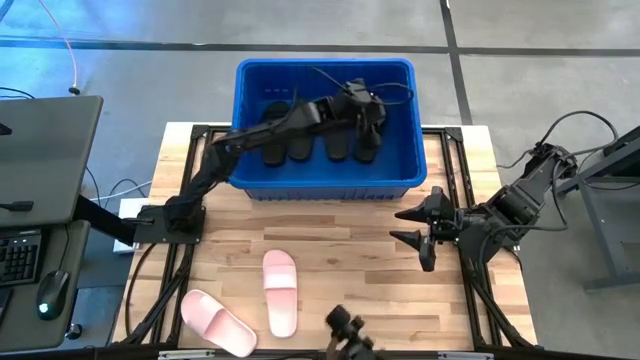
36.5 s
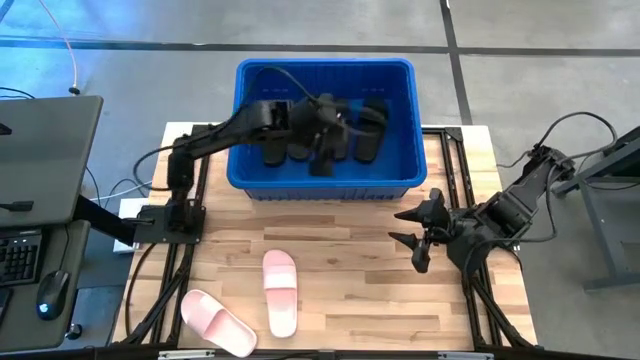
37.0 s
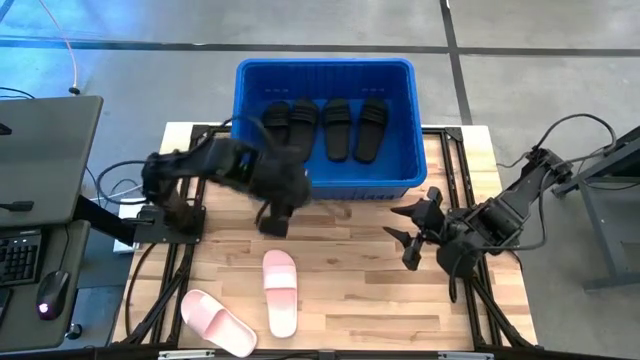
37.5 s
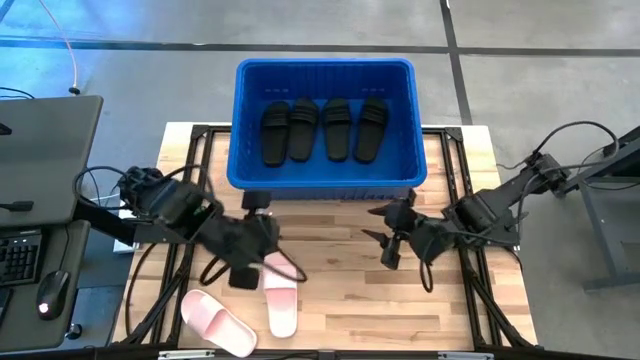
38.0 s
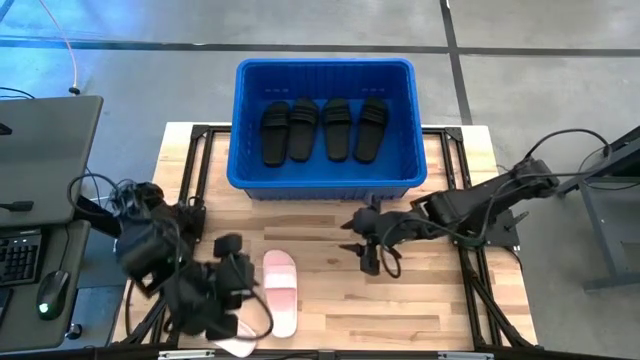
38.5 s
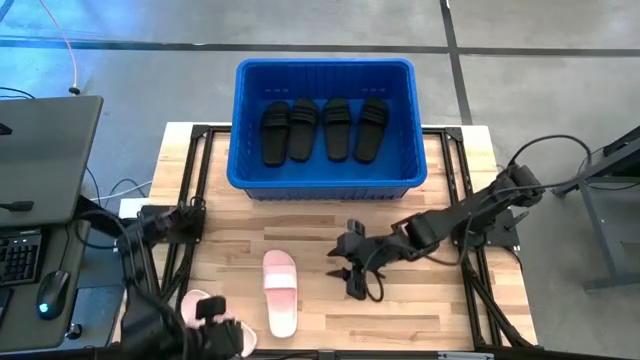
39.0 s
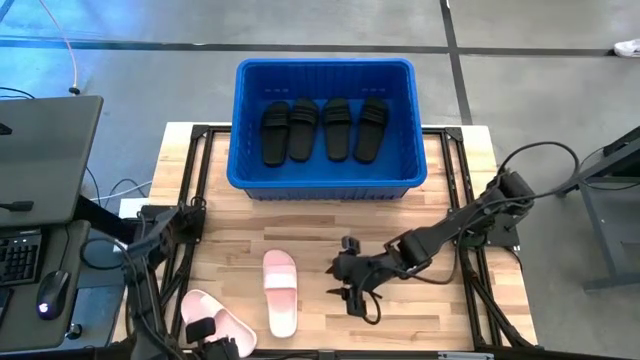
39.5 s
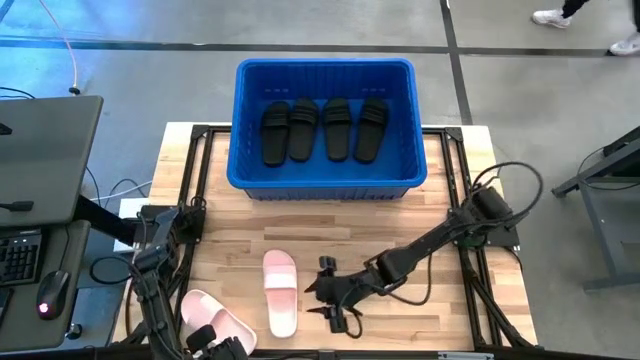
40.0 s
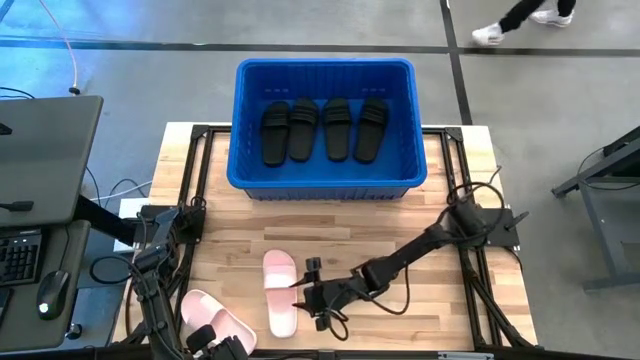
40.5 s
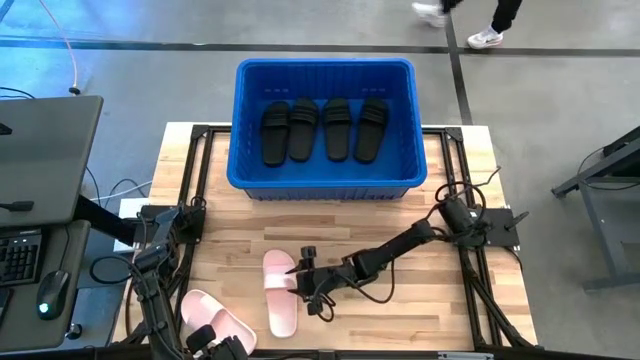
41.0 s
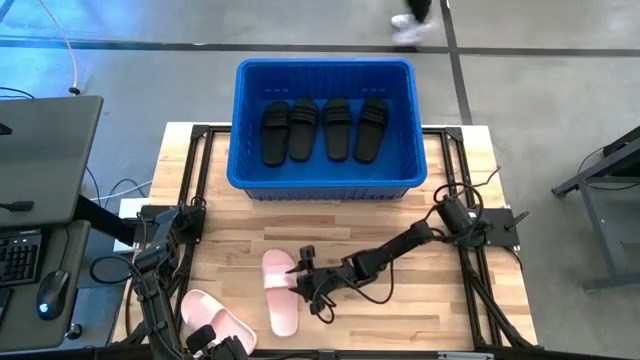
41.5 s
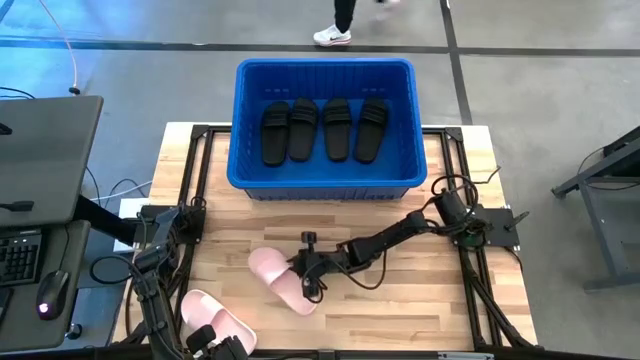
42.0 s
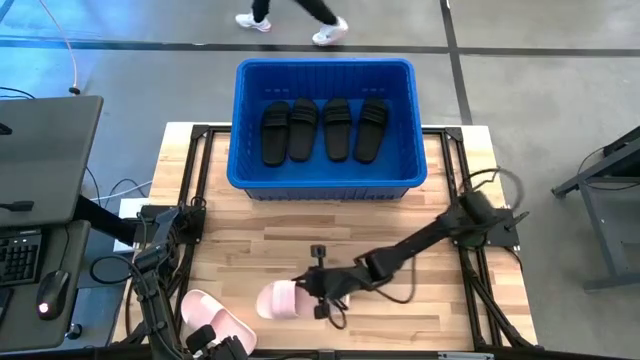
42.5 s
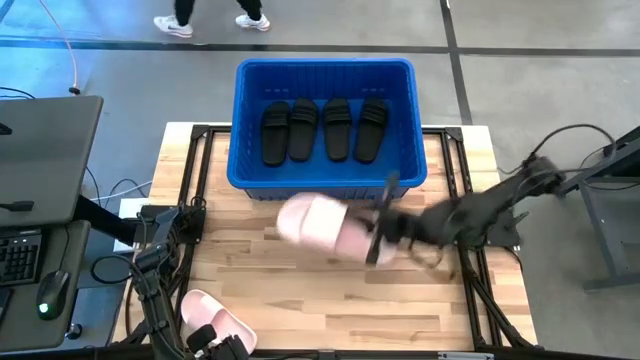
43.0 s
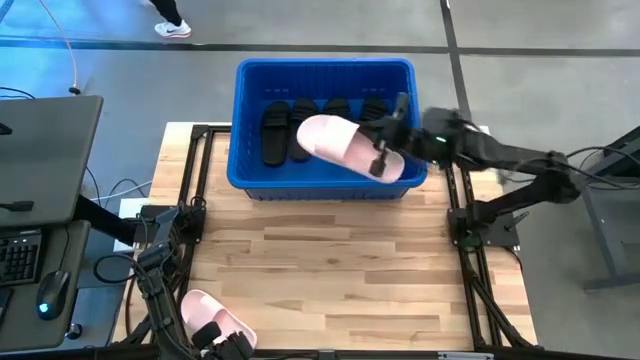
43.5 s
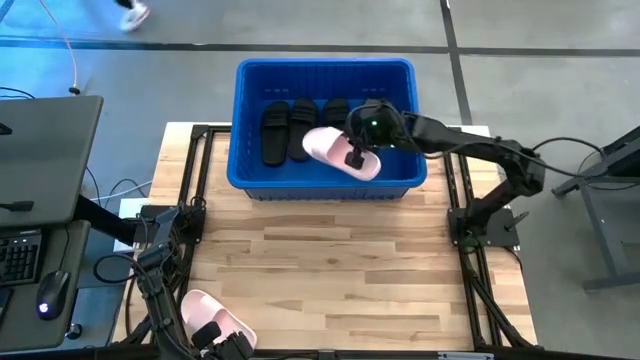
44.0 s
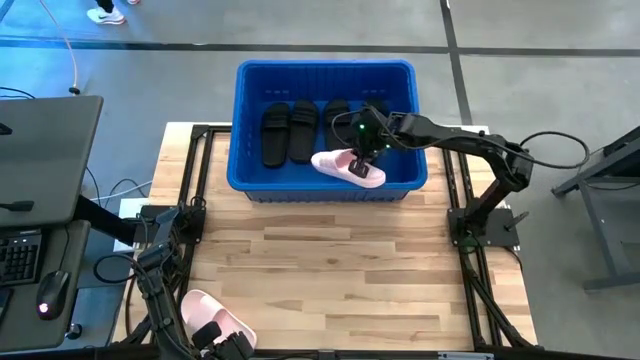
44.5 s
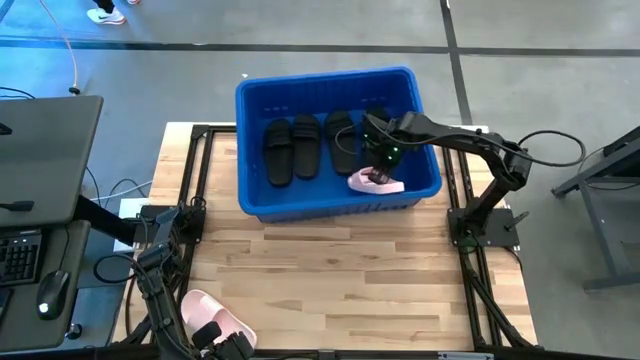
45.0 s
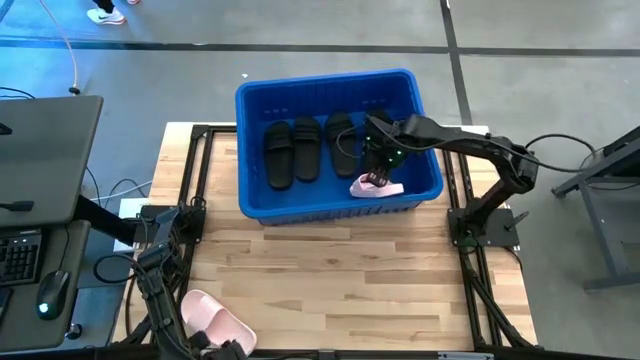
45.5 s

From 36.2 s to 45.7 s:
Task: Pick and place slides into bin
Put the pink slide into the blue bin

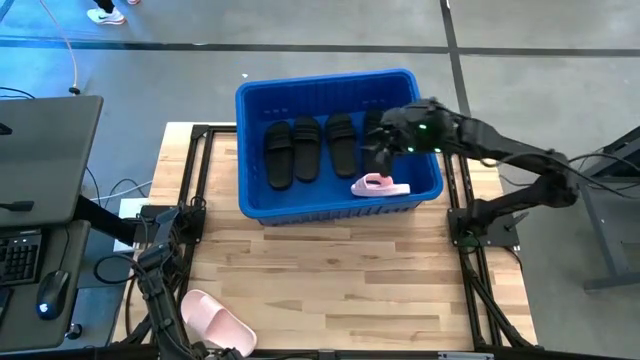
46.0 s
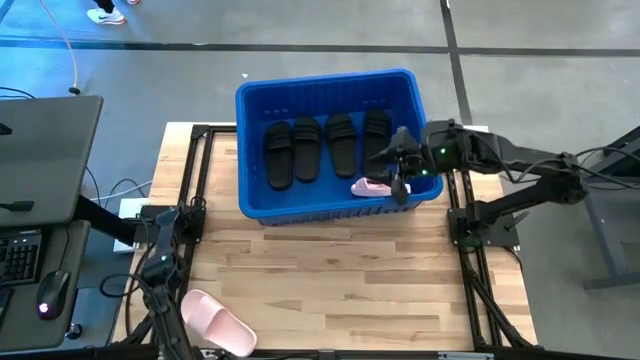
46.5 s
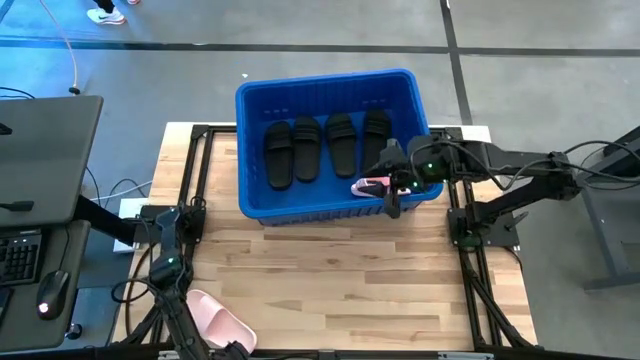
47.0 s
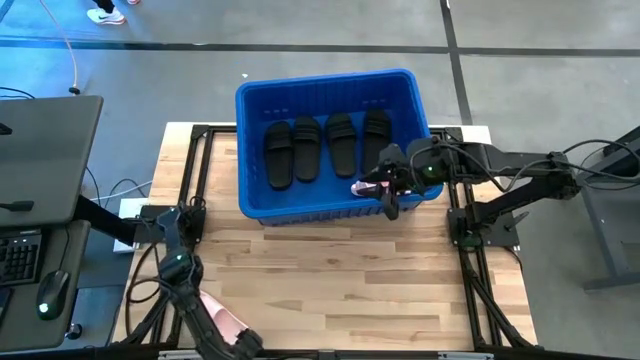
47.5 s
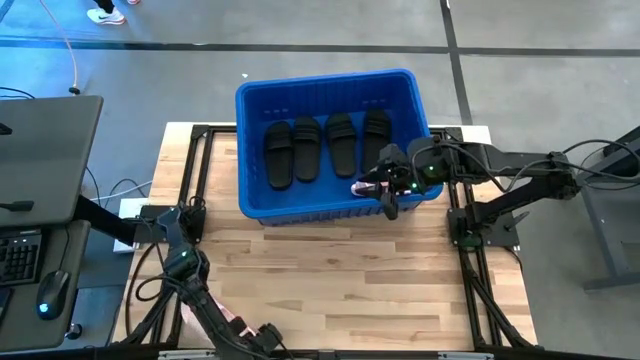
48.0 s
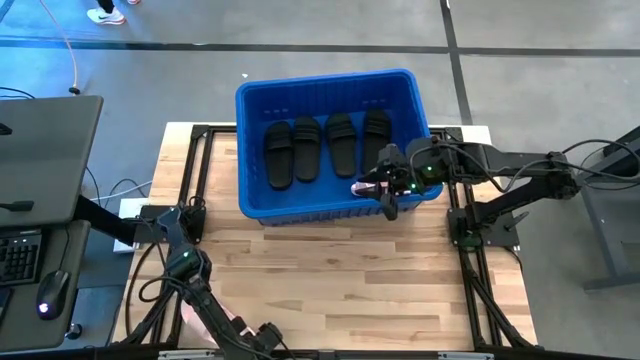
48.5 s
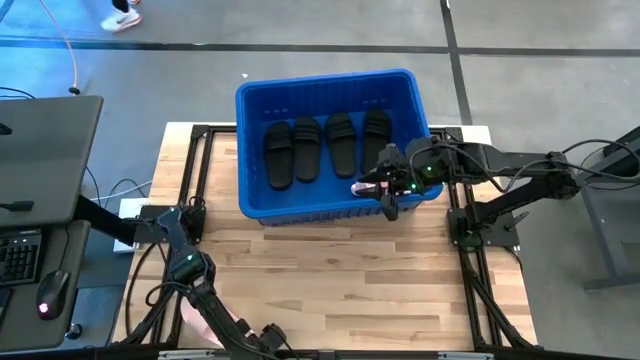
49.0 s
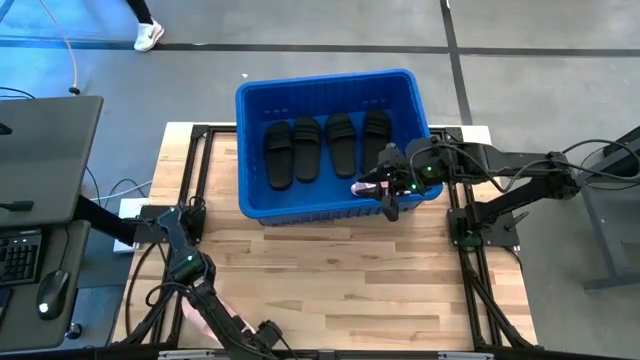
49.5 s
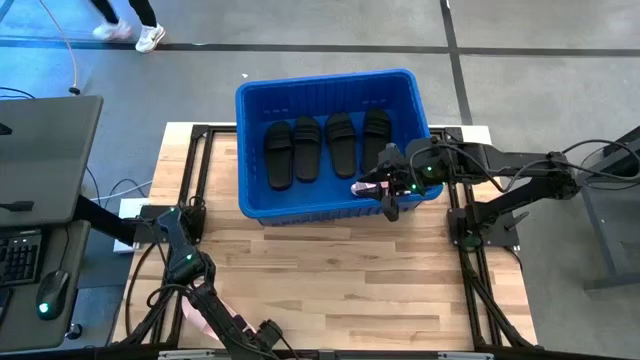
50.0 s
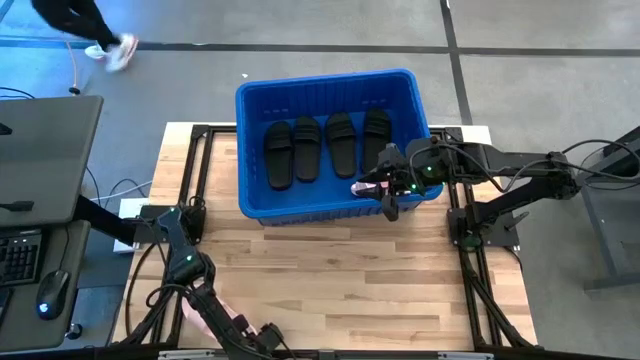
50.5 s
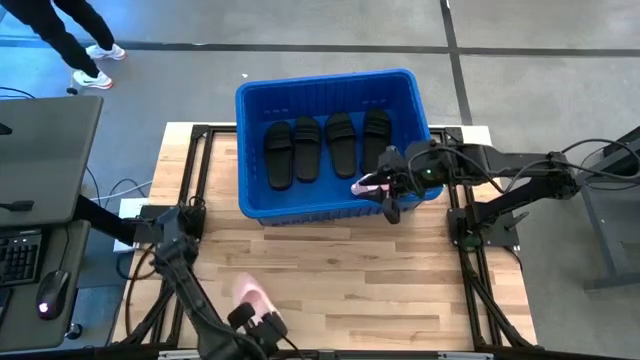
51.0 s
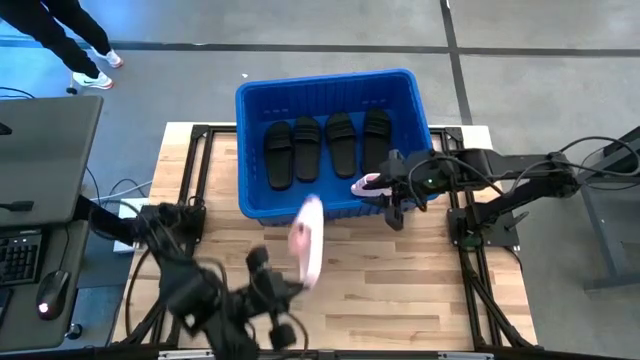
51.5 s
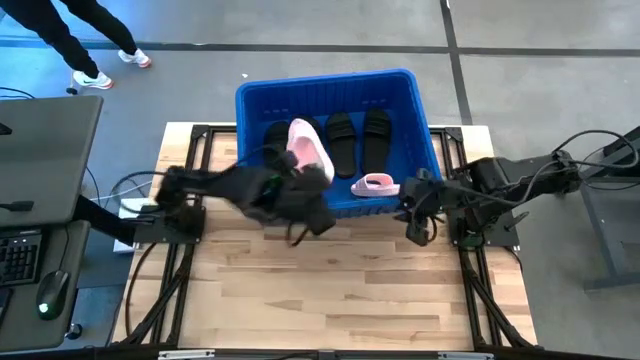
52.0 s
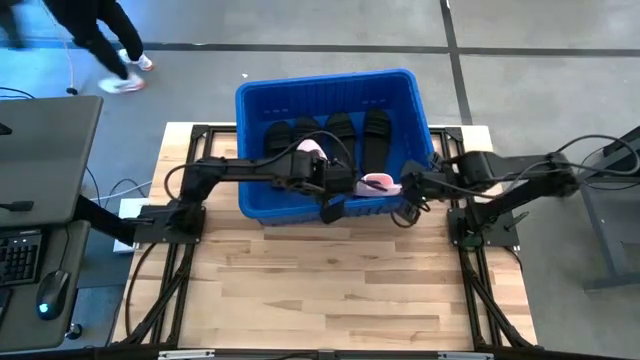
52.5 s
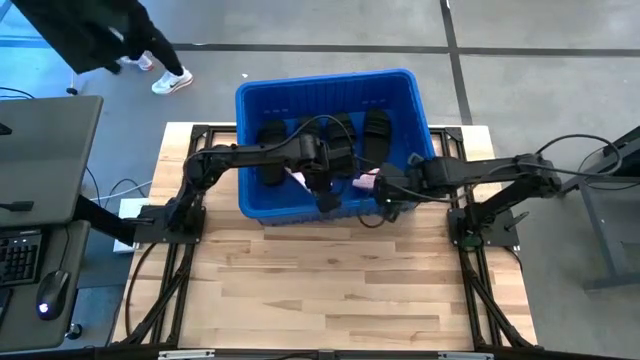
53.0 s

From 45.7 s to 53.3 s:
Put the pink slide into the blue bin

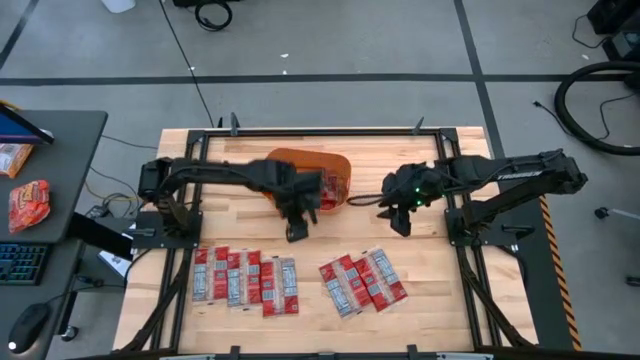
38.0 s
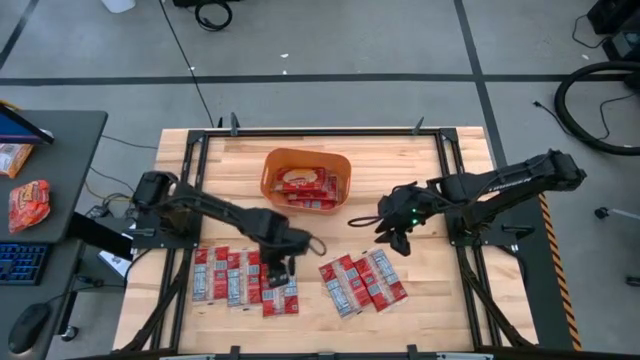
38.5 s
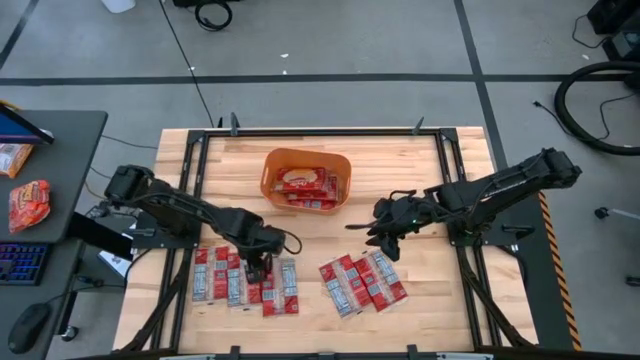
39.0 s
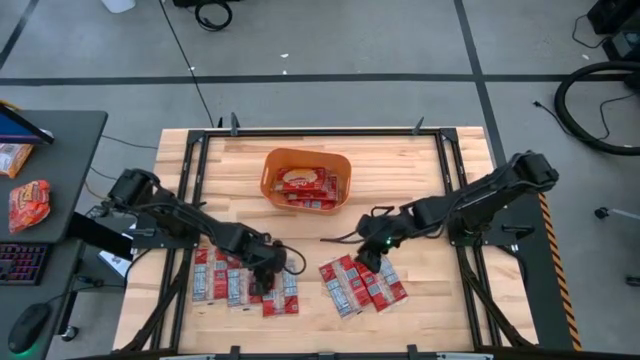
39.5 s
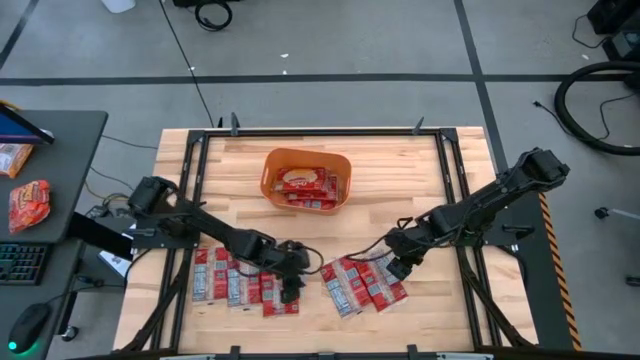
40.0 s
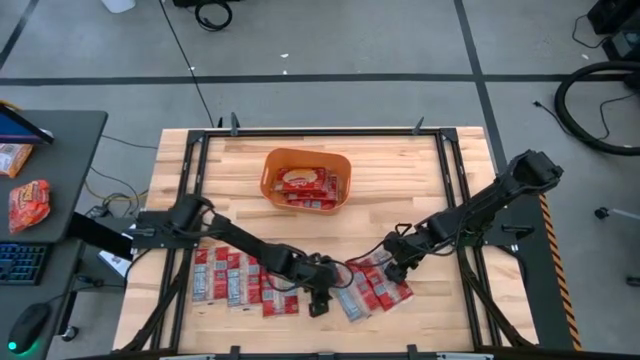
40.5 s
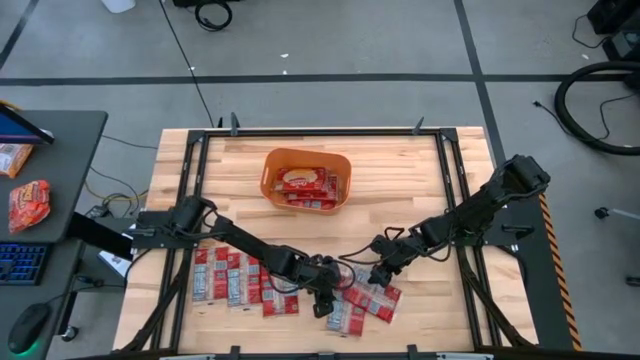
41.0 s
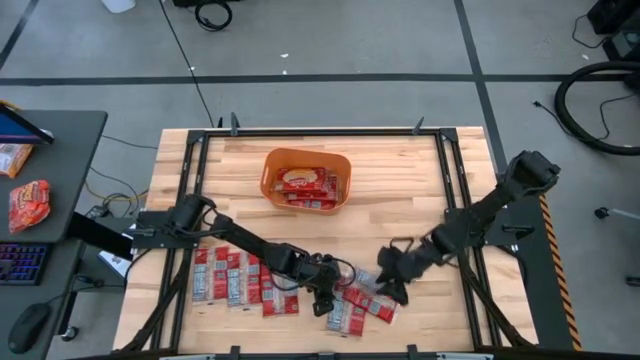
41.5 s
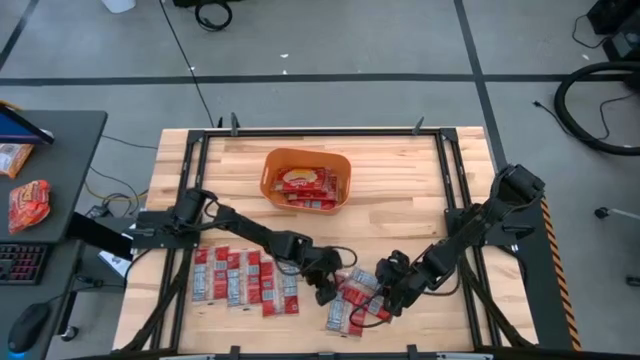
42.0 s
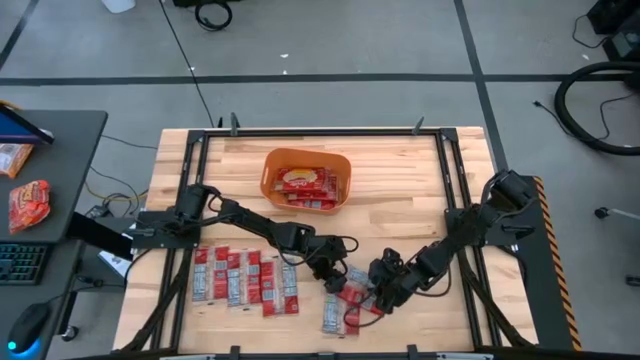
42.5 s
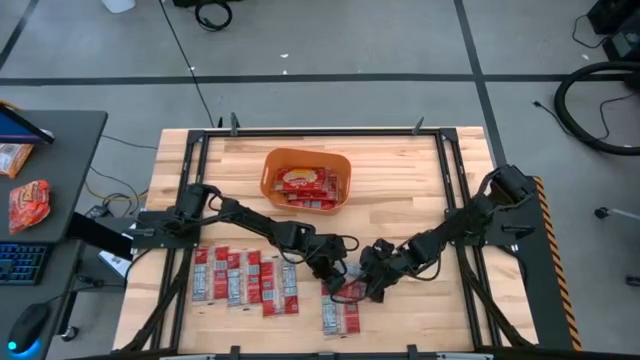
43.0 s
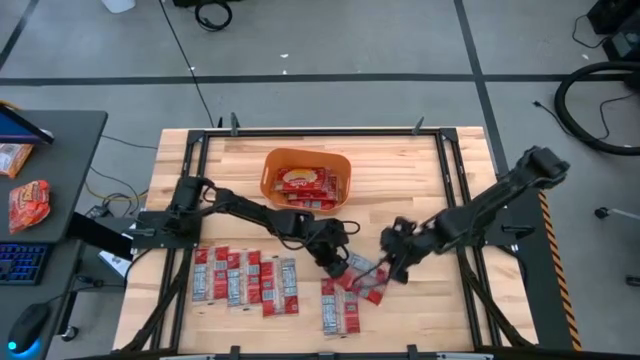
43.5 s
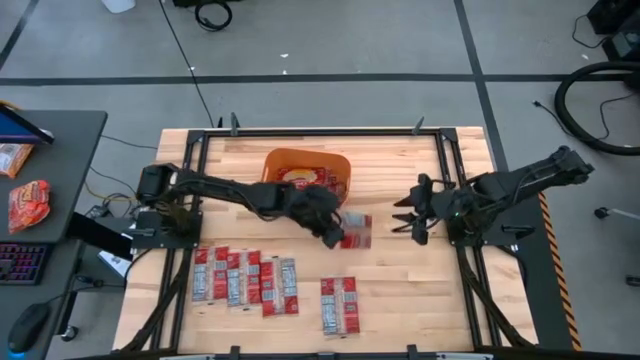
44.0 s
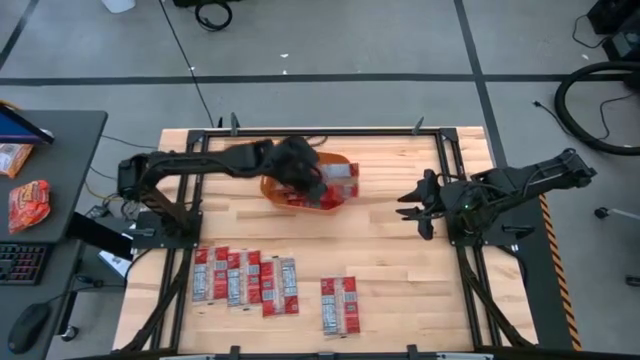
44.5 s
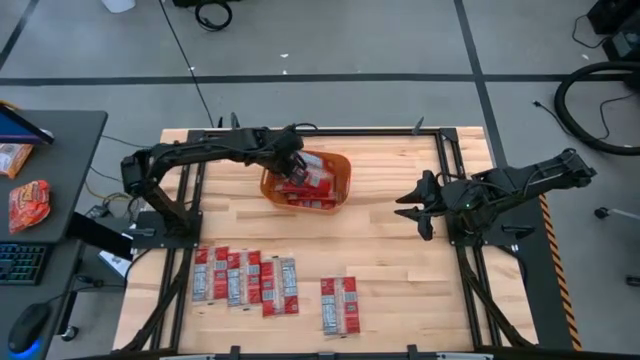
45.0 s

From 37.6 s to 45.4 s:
Task: Sort popcorn bags into baskets
Put the red popcorn bag into the orange bin
